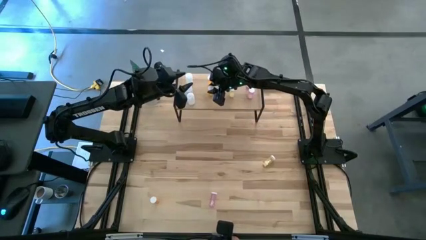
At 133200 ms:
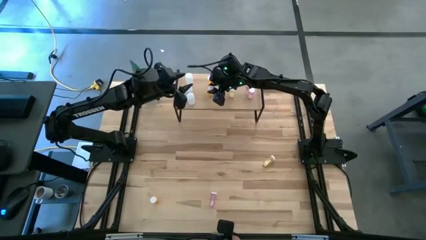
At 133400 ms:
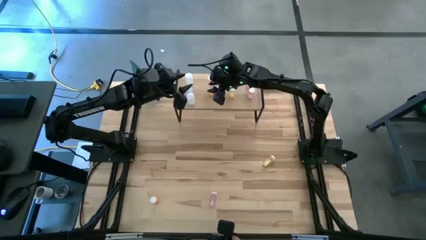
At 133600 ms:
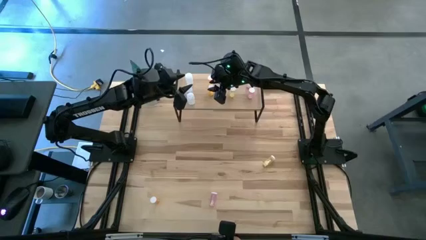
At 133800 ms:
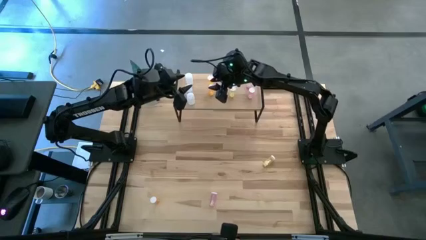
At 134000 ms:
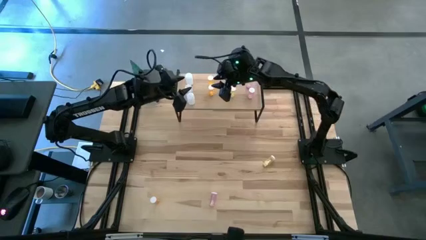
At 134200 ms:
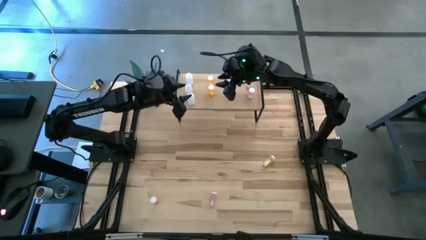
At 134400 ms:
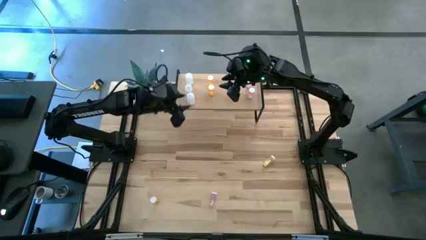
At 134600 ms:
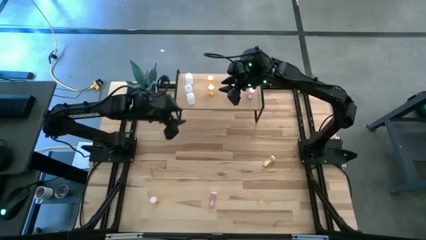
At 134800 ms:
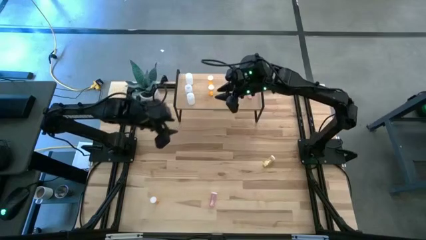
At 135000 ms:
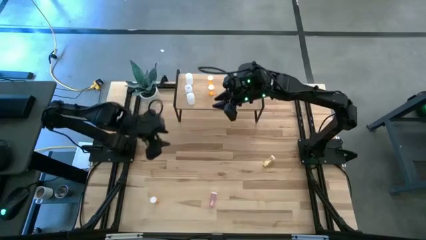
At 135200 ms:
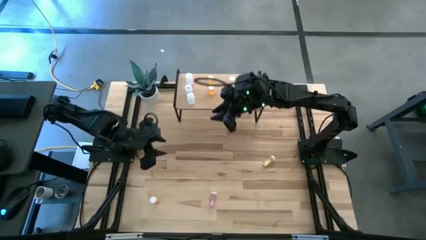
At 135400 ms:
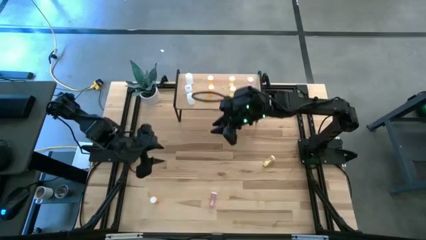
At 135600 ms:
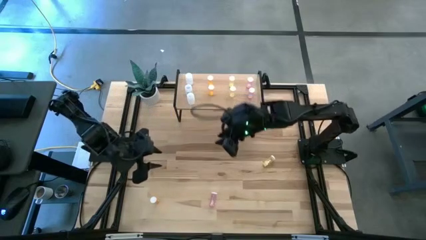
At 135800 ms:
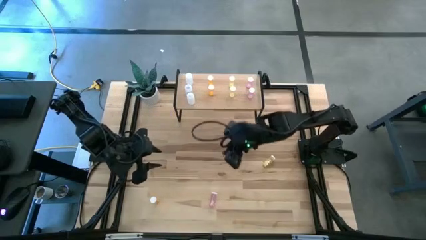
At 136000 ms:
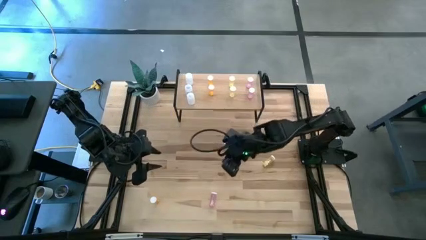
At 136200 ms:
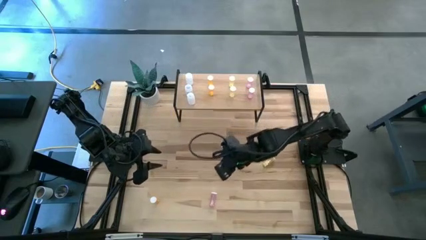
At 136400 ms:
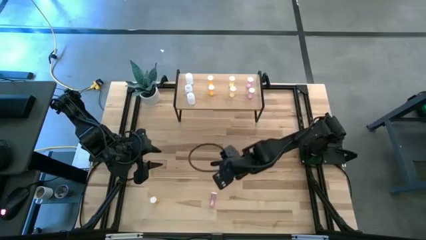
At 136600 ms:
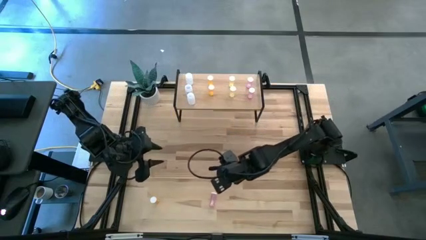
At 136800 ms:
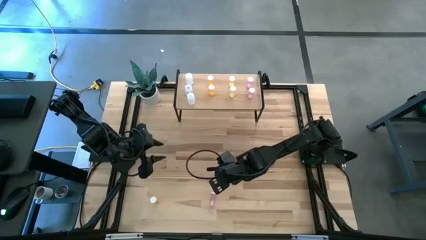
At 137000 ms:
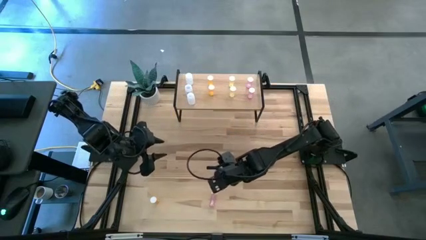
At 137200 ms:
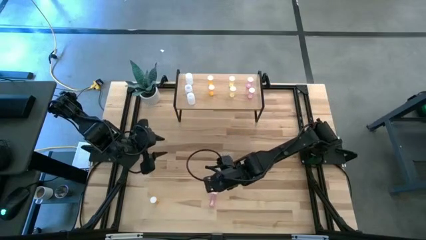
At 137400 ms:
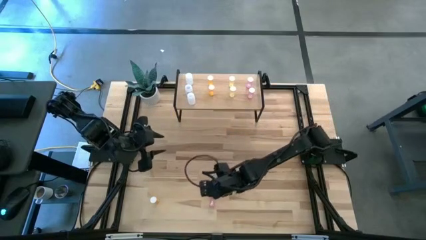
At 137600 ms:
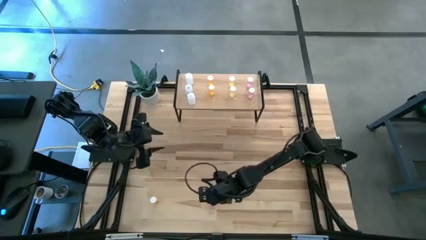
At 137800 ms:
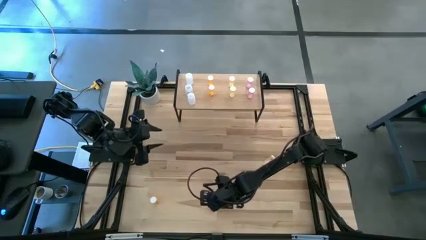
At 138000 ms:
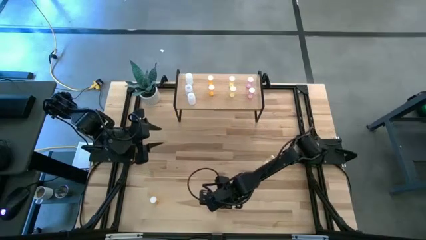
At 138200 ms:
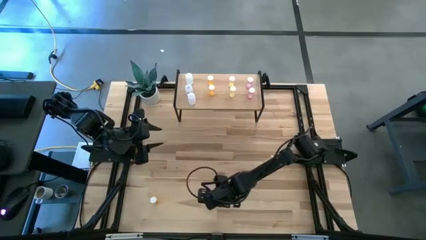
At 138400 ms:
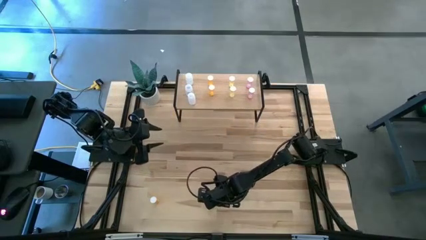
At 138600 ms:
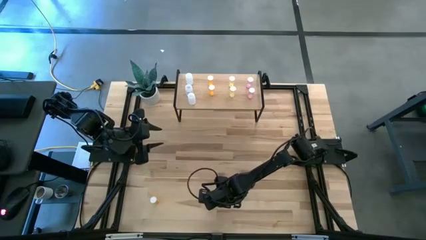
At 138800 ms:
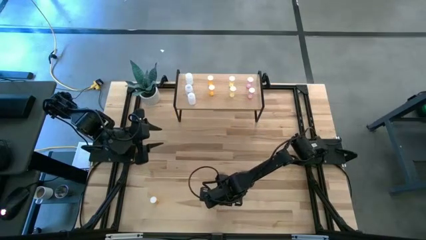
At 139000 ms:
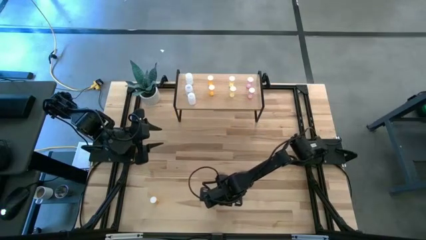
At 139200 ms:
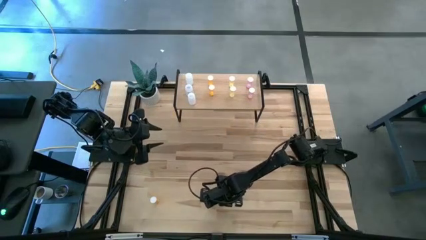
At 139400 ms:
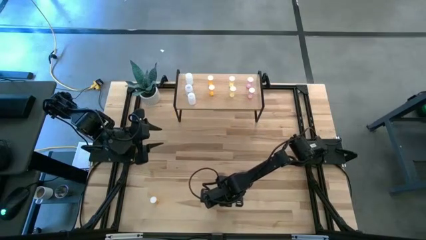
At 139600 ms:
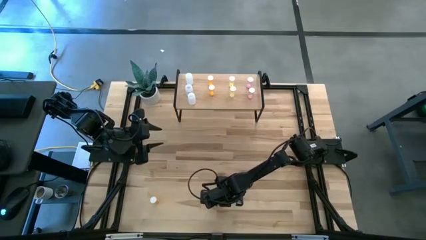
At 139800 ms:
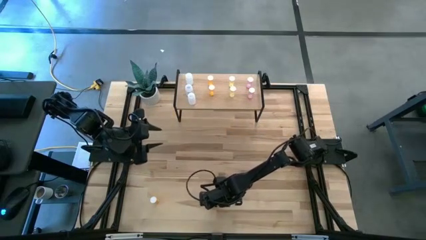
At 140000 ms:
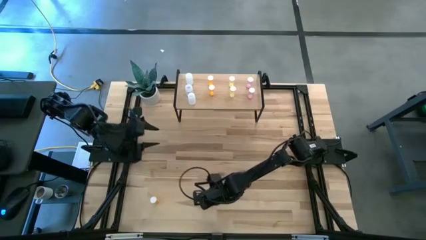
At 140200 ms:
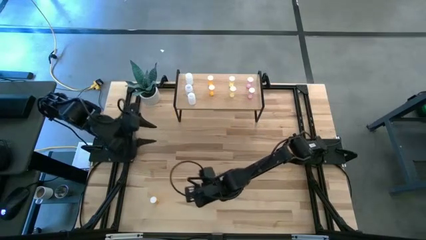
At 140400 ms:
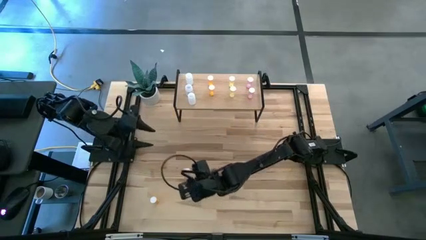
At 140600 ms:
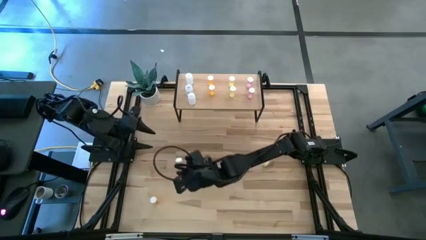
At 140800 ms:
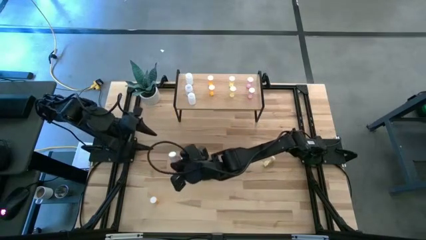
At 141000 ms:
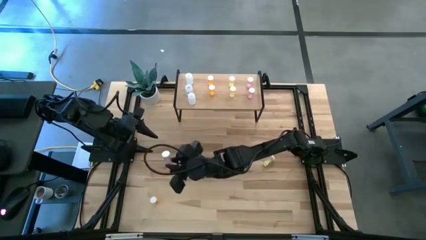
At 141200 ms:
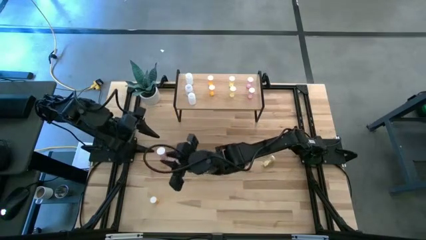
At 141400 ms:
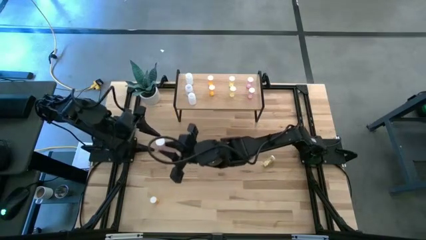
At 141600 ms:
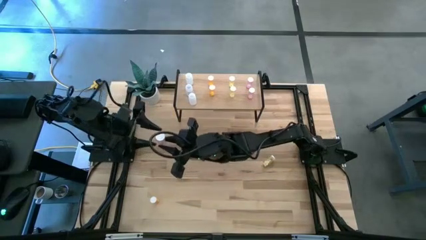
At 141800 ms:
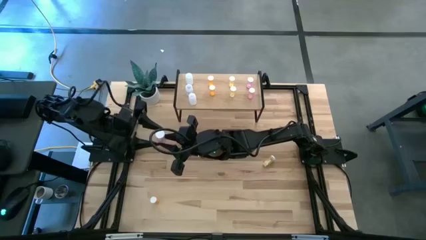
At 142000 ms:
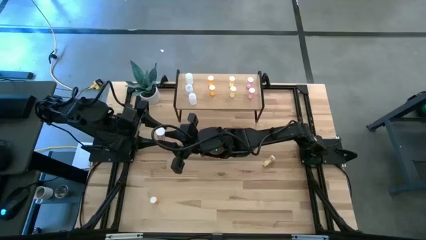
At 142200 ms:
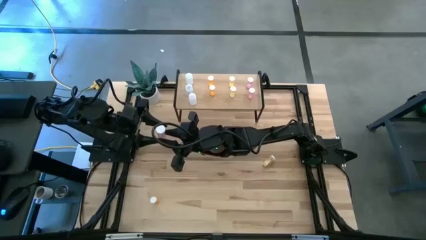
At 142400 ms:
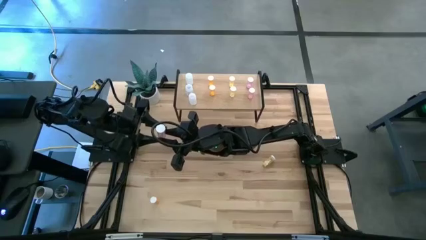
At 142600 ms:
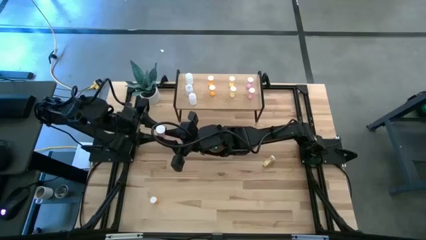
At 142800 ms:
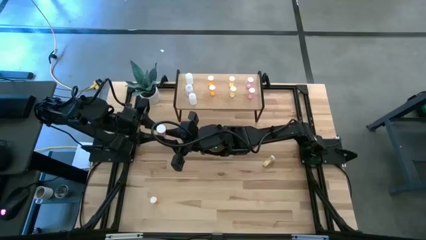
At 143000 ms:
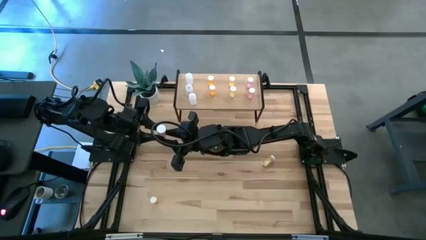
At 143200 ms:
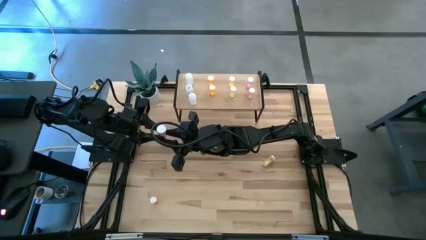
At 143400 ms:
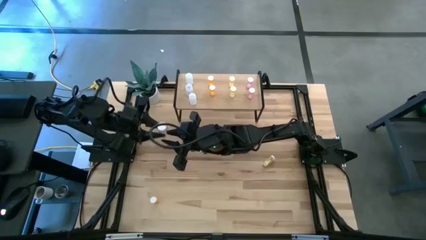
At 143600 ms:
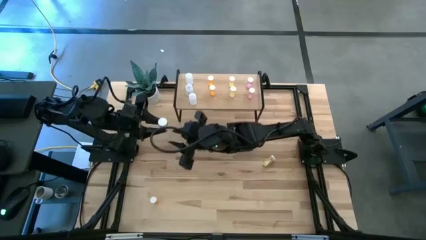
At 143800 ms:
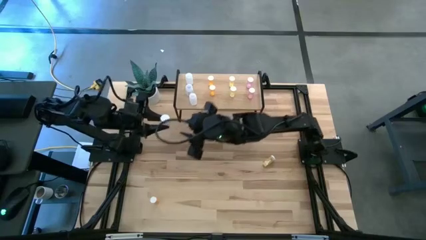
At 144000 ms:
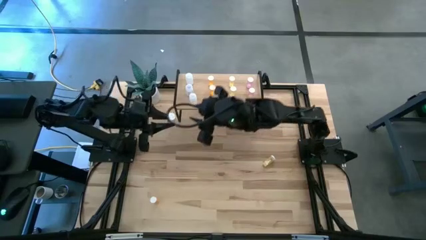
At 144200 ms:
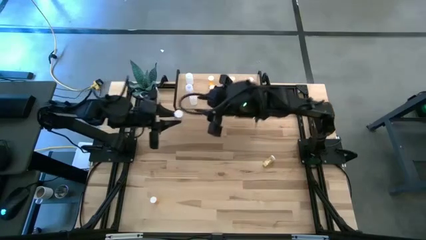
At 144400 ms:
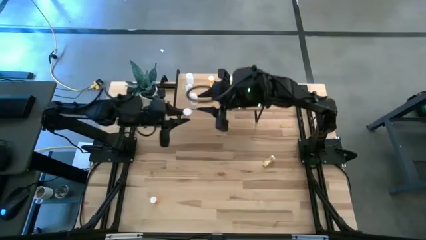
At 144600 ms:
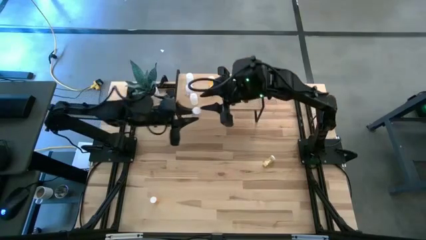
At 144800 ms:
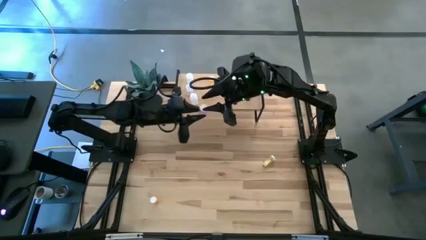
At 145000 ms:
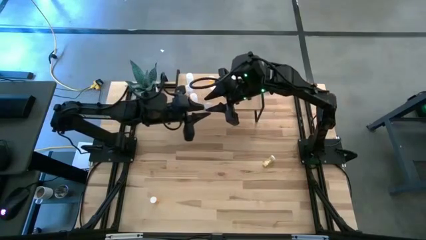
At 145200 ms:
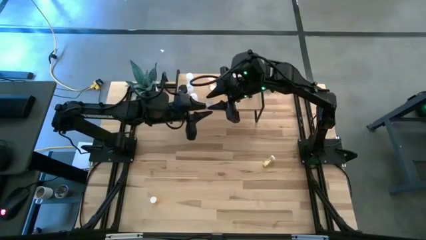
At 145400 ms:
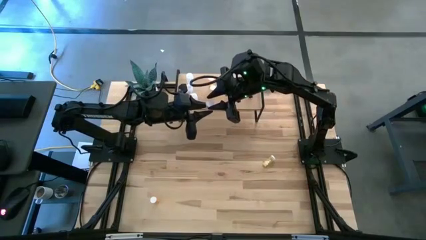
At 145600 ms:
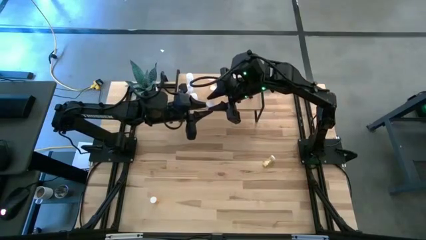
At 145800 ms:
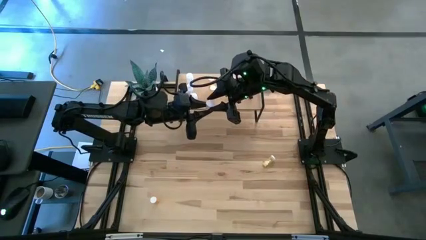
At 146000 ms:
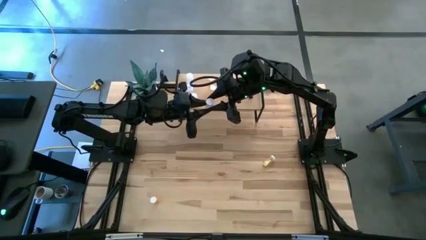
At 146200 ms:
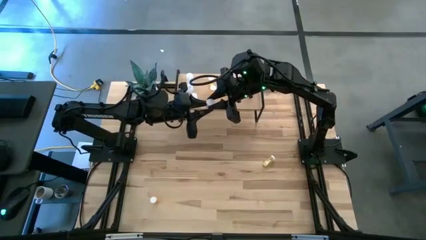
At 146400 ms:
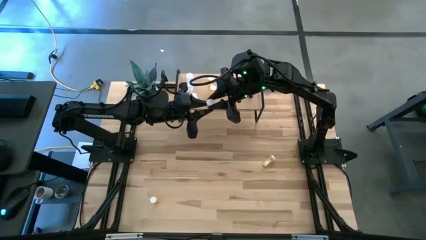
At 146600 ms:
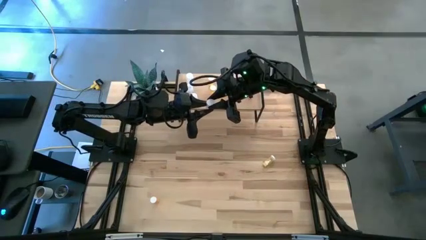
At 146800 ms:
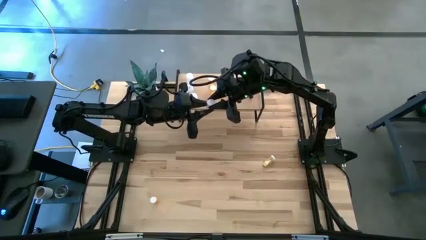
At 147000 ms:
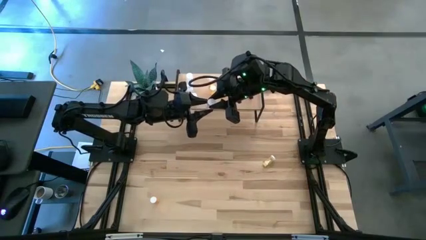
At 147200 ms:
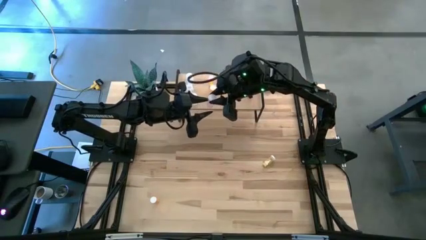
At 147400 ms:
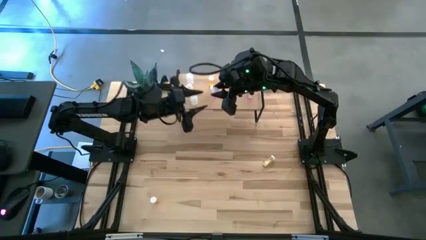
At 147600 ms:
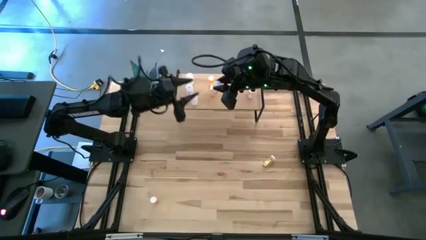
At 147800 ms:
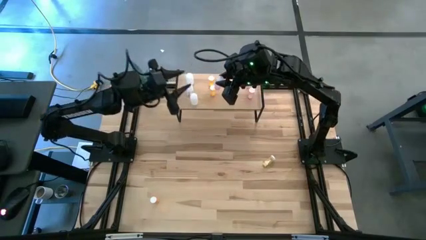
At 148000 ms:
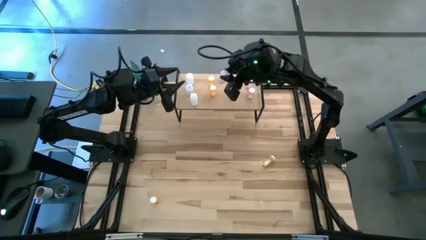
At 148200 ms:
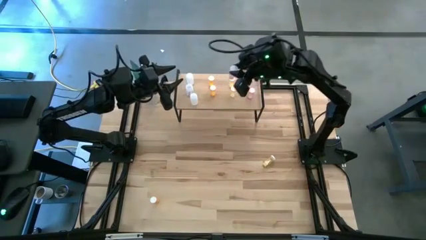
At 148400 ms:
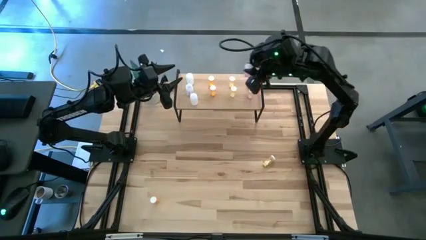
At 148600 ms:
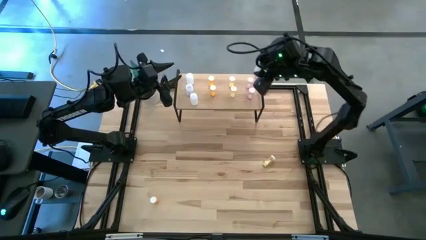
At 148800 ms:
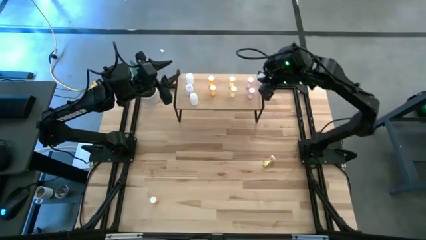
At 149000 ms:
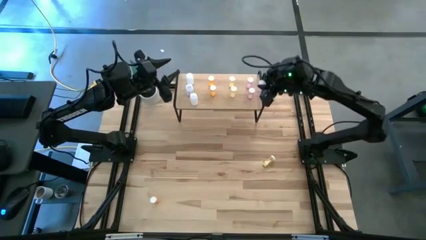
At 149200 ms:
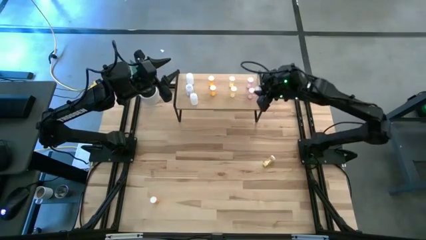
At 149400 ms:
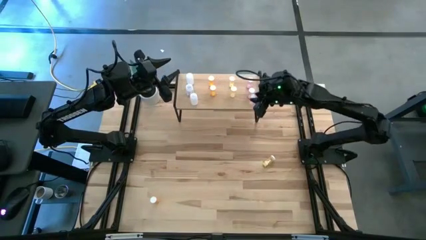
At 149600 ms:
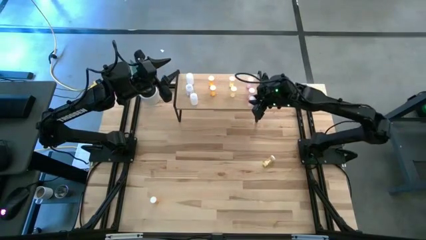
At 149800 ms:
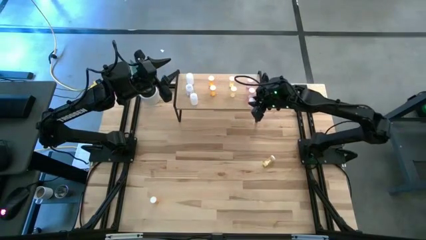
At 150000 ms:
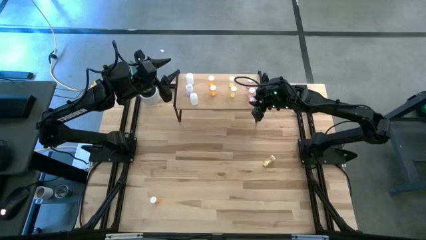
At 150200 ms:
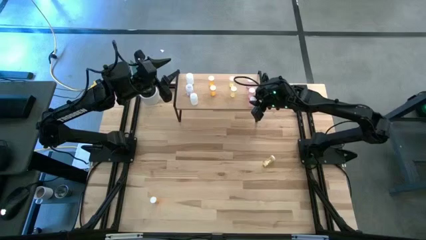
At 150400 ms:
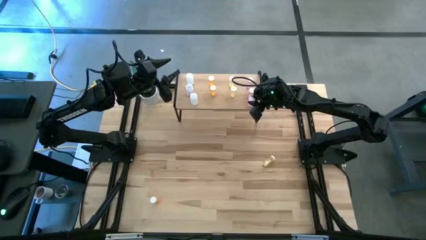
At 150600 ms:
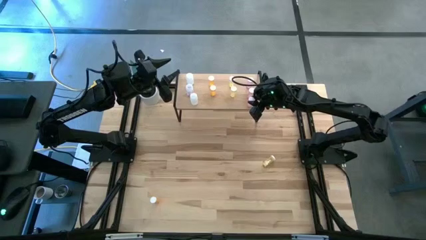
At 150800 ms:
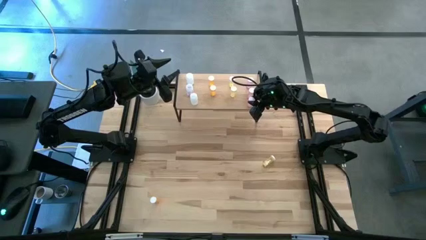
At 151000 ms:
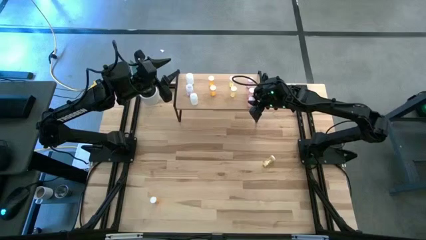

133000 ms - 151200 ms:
Task: Pick and place medicine bottles onto shelf by color
Put the pink pill bottle on the shelf aligned with the other pink pill bottle
